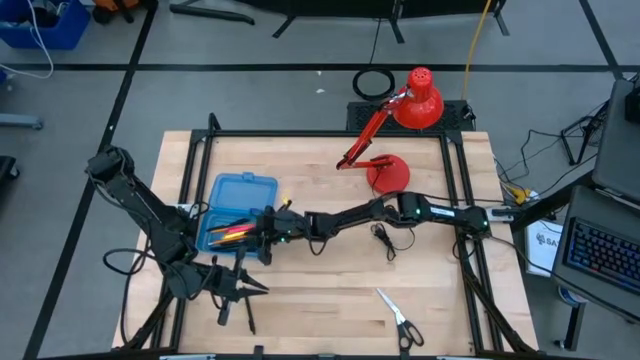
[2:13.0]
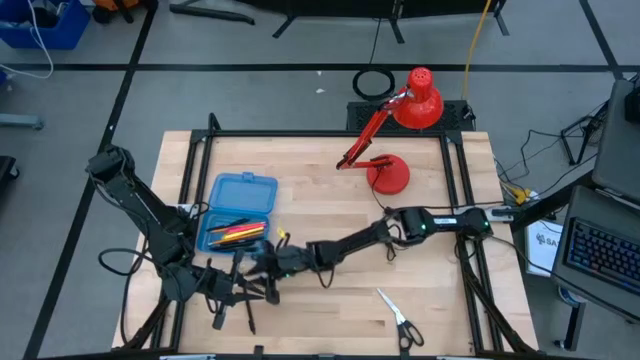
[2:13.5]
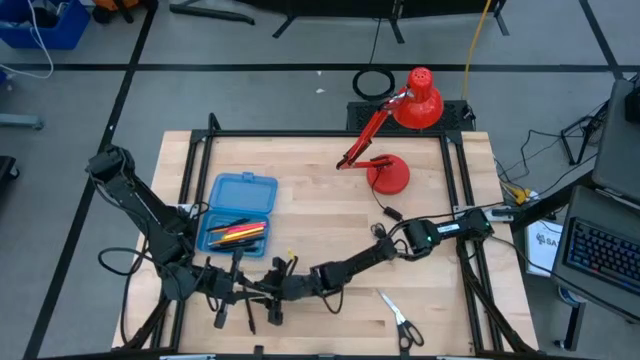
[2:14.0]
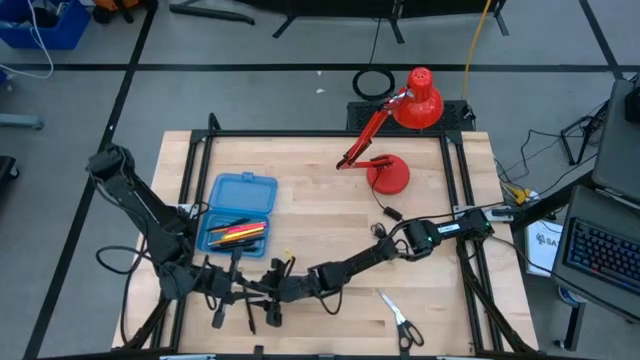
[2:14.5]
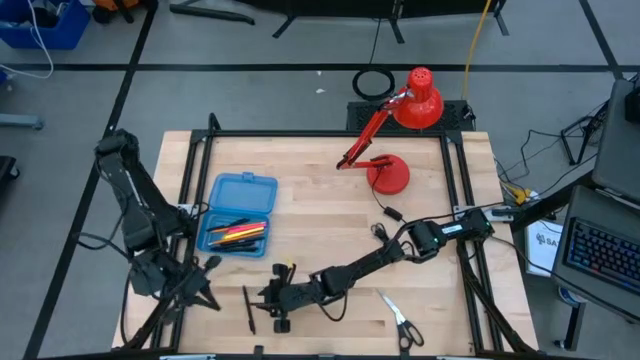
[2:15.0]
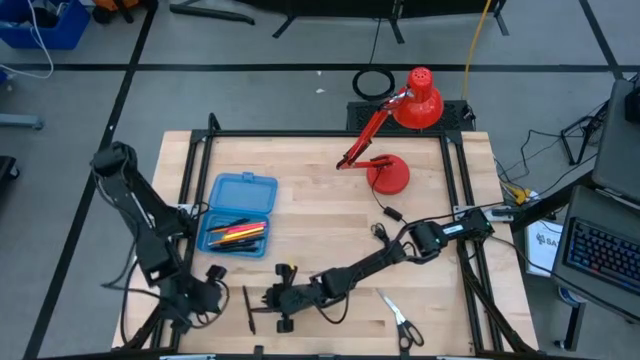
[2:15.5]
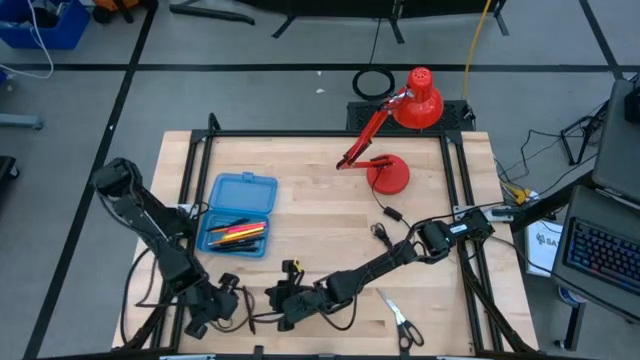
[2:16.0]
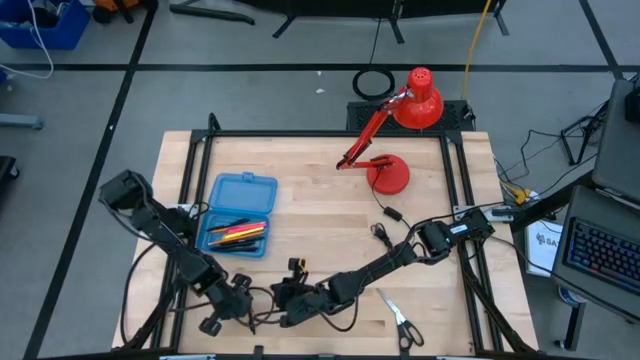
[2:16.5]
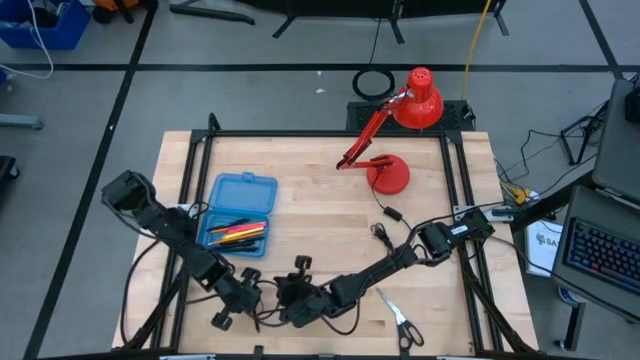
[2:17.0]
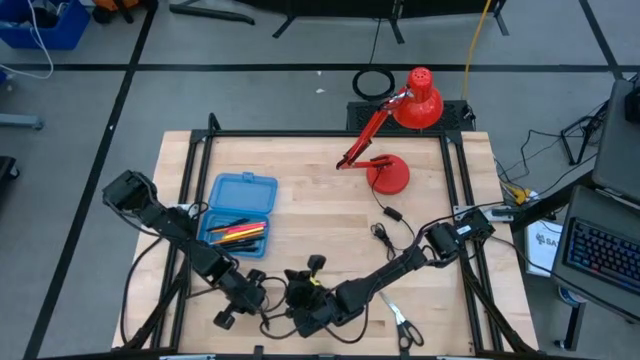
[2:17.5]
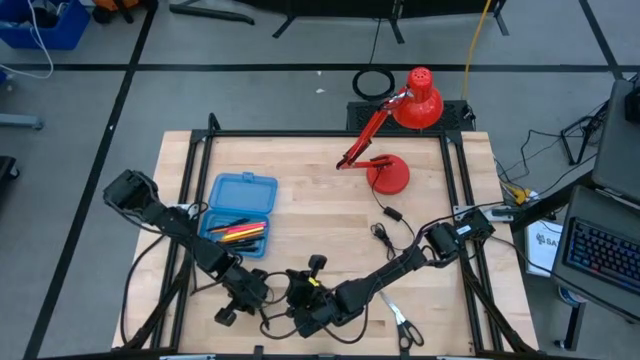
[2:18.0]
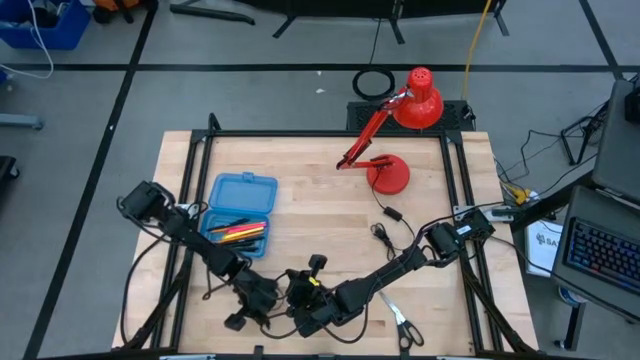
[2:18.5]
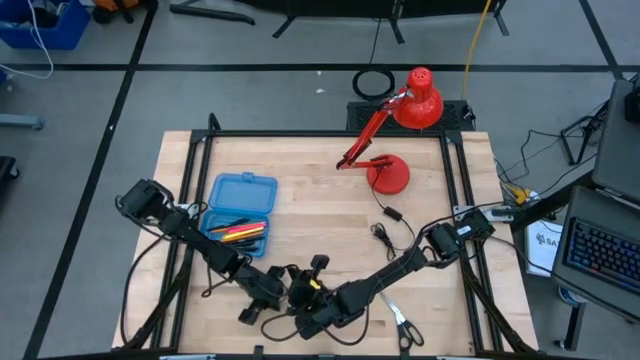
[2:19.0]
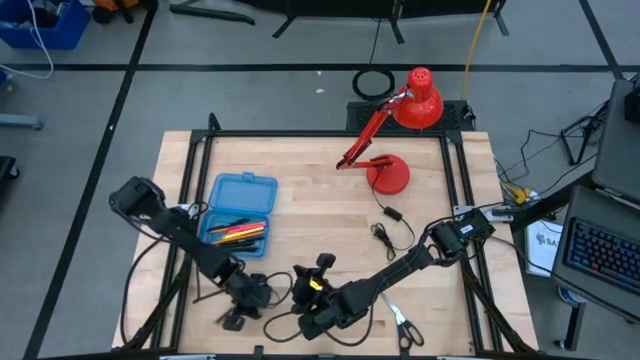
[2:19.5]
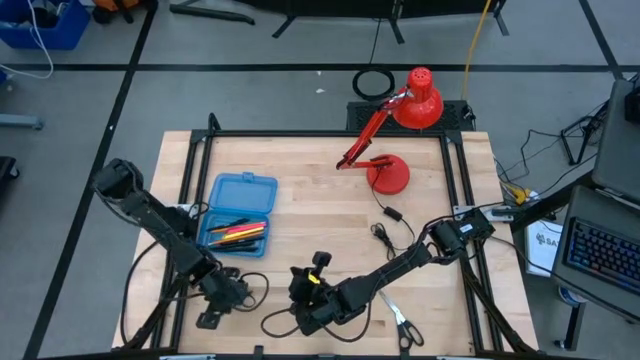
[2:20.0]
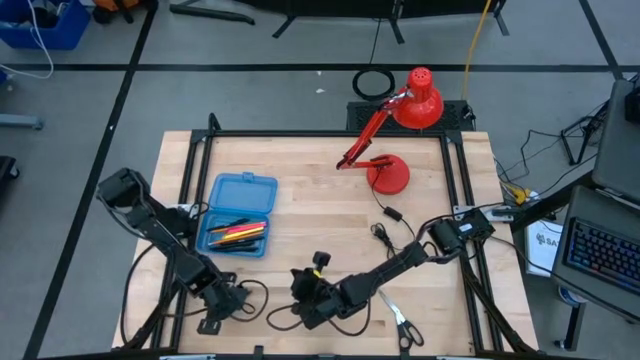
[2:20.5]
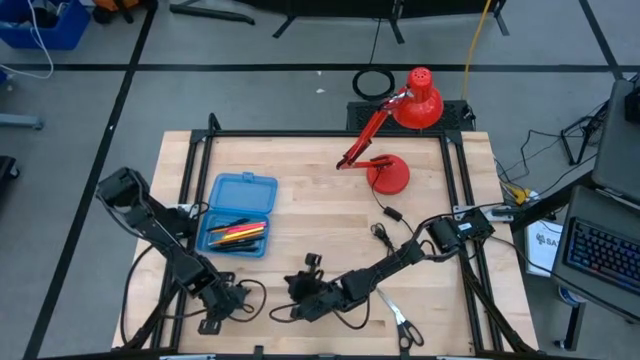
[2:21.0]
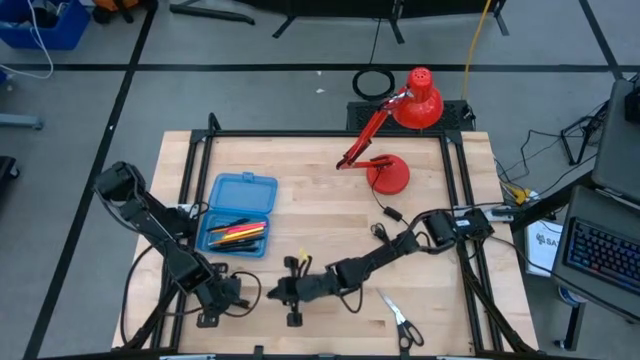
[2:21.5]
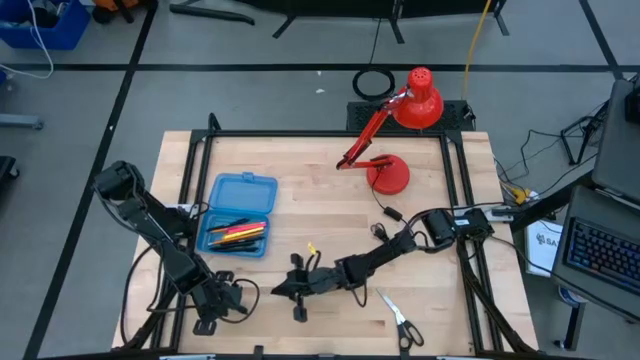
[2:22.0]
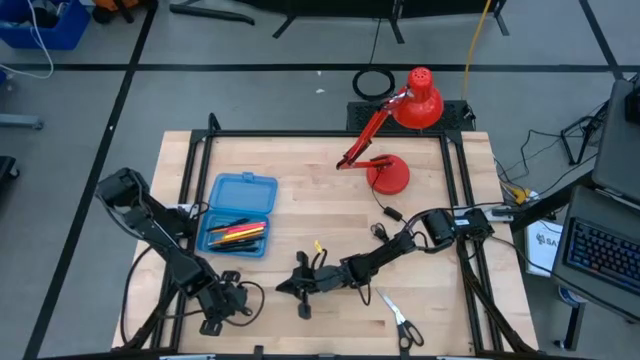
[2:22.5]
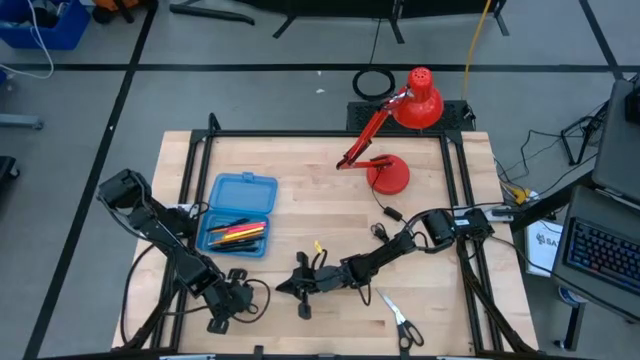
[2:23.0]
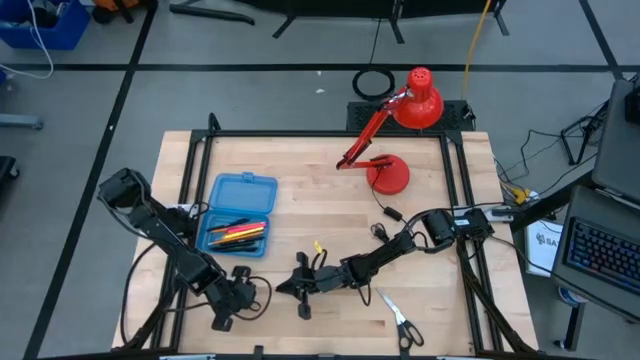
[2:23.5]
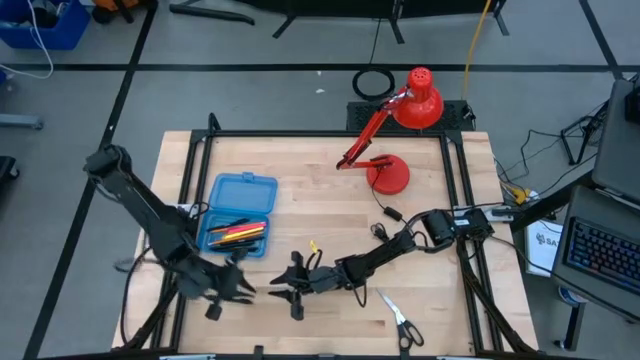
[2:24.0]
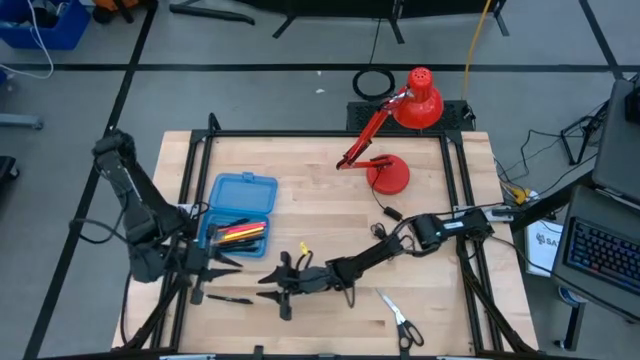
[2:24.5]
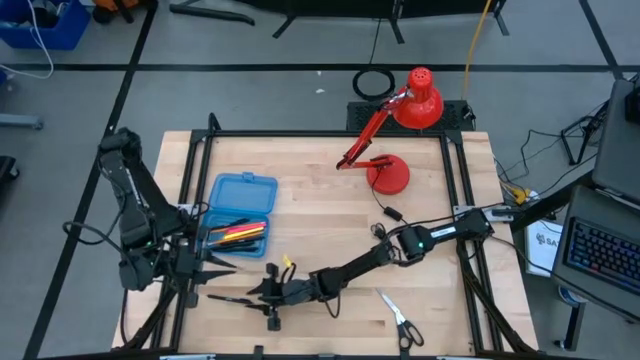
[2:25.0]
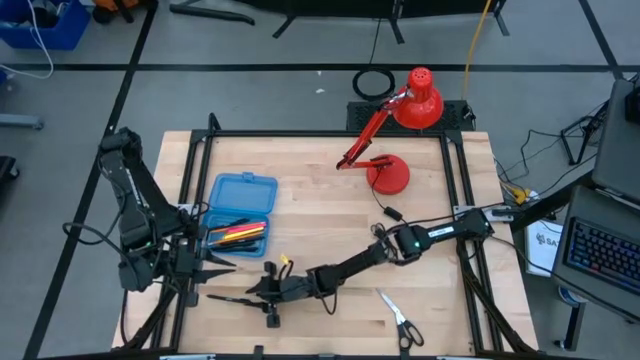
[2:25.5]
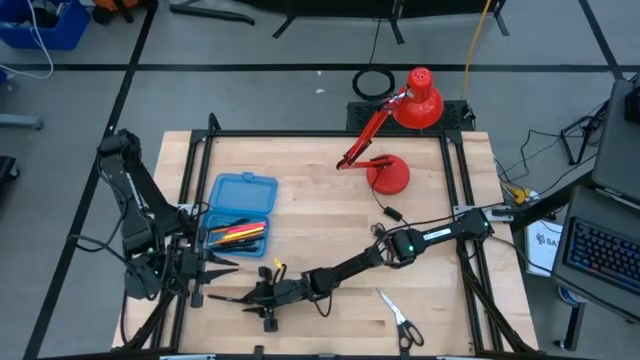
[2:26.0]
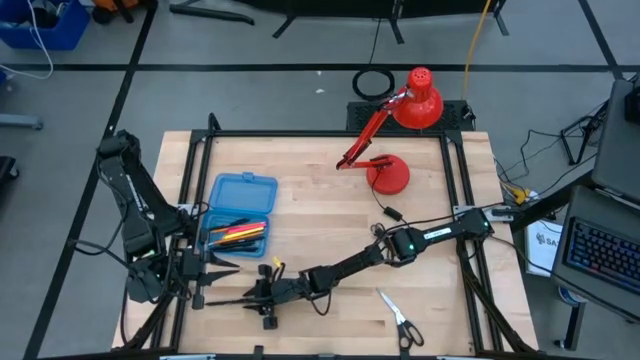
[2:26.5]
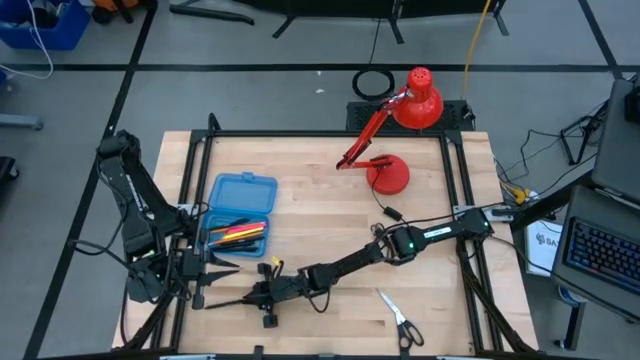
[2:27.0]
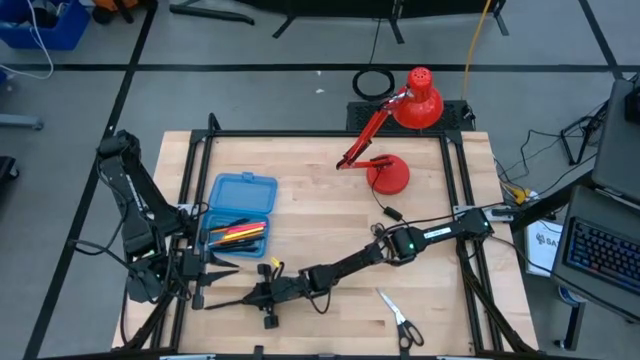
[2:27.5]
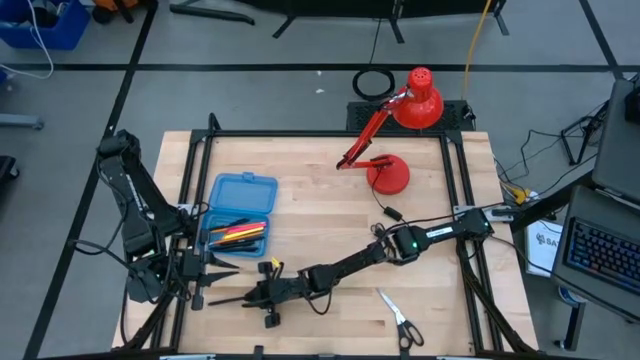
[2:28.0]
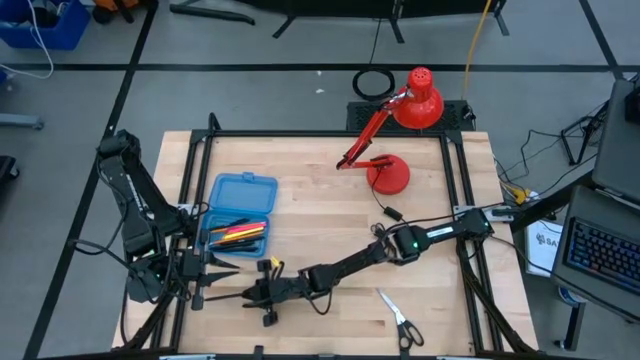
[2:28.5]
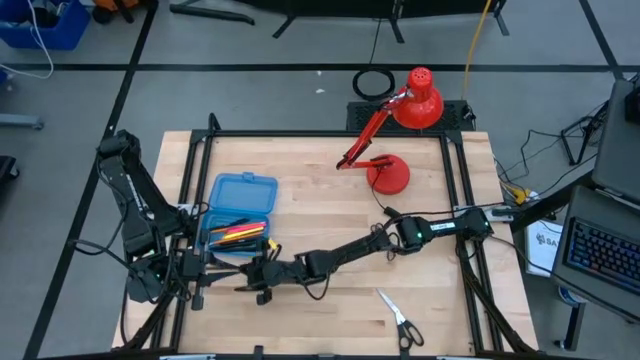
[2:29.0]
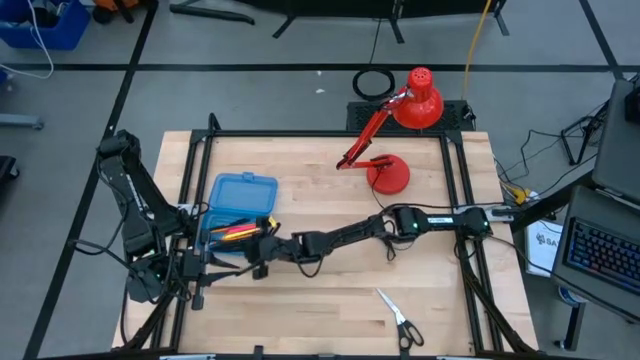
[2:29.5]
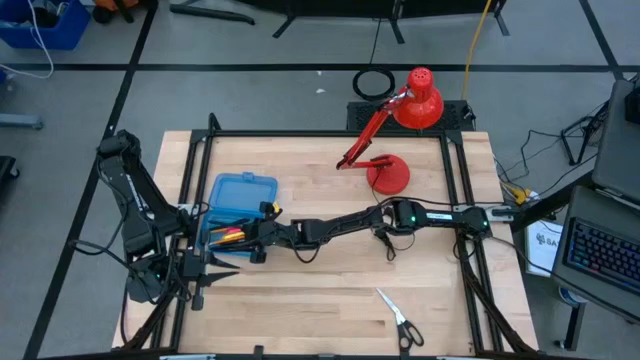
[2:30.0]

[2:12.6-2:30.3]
Task: Pick & place school supplies into a supply box
Put the black pen into the blue supply box

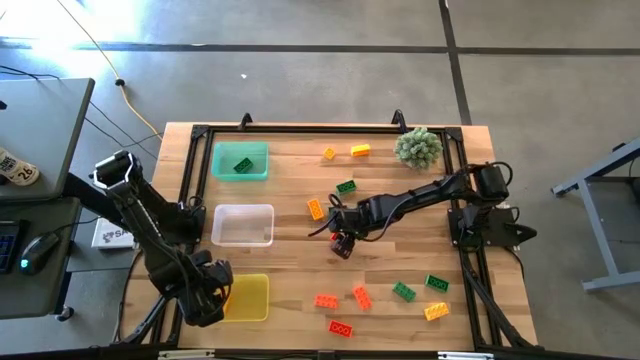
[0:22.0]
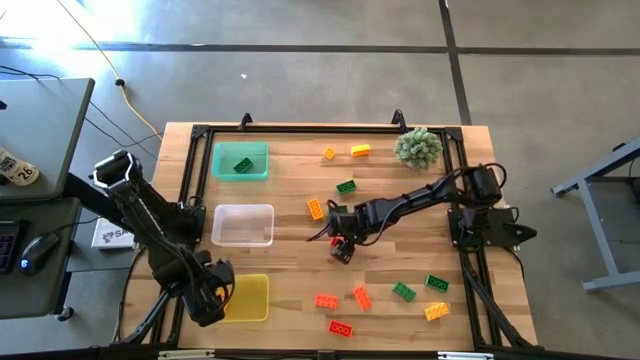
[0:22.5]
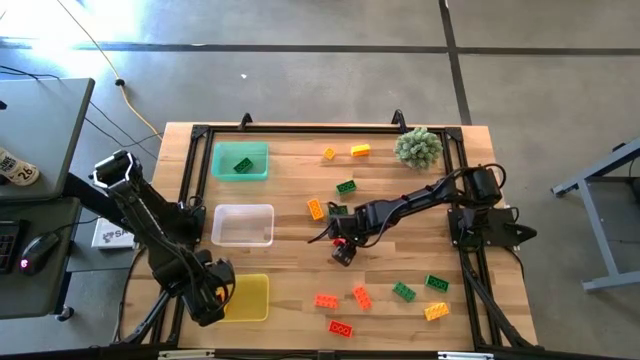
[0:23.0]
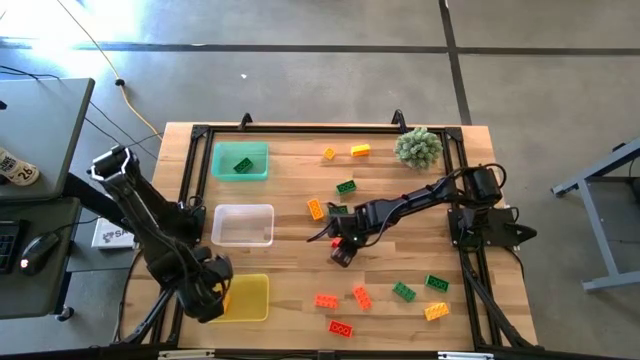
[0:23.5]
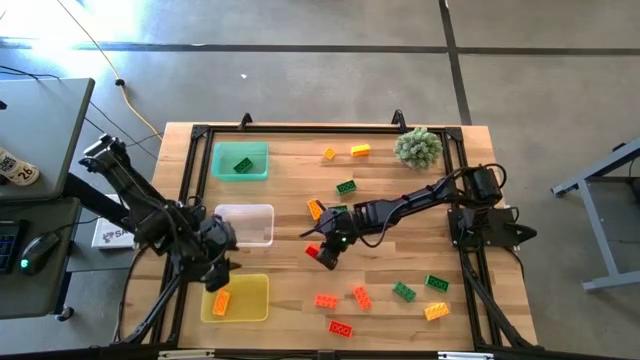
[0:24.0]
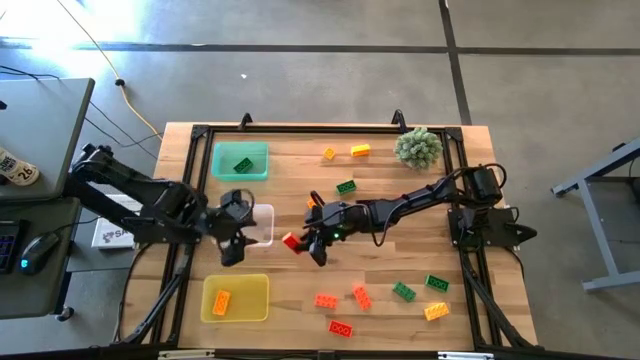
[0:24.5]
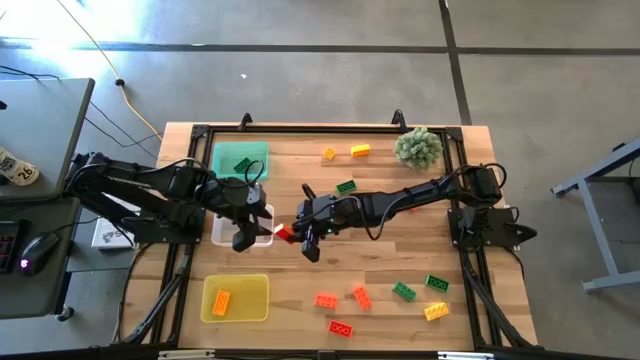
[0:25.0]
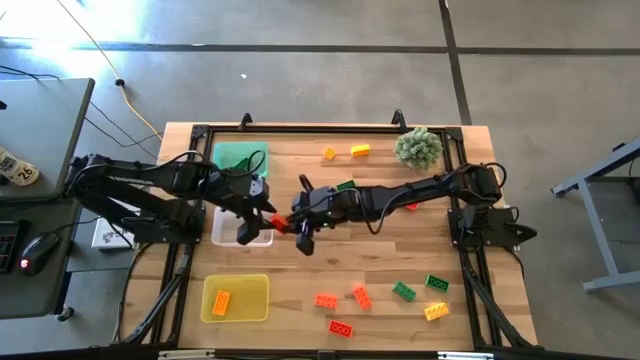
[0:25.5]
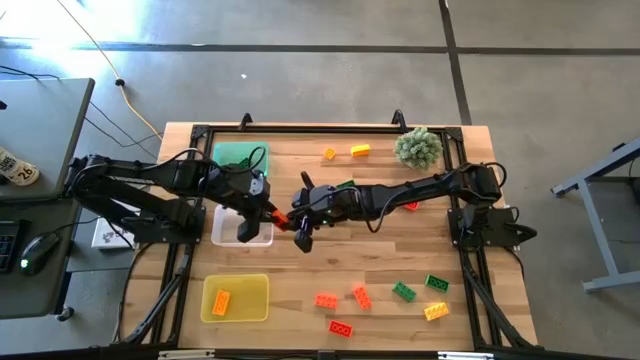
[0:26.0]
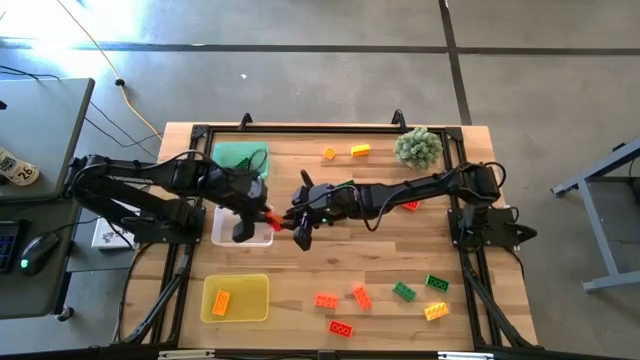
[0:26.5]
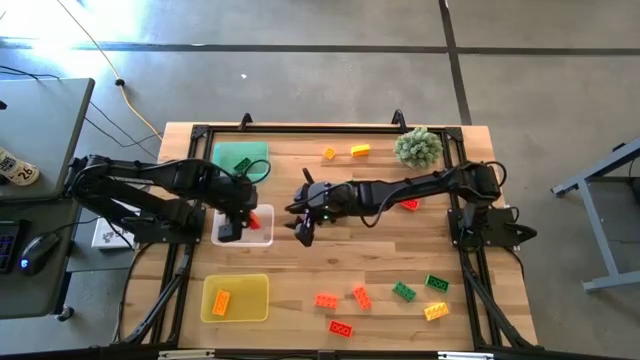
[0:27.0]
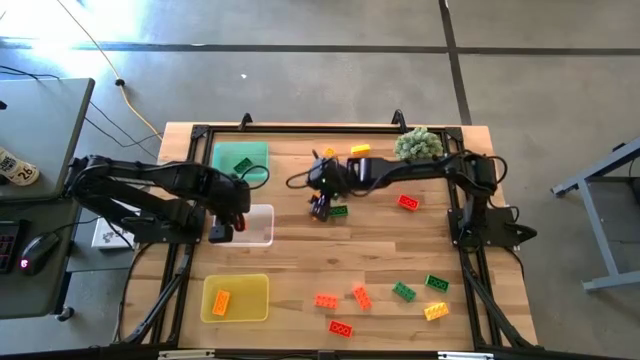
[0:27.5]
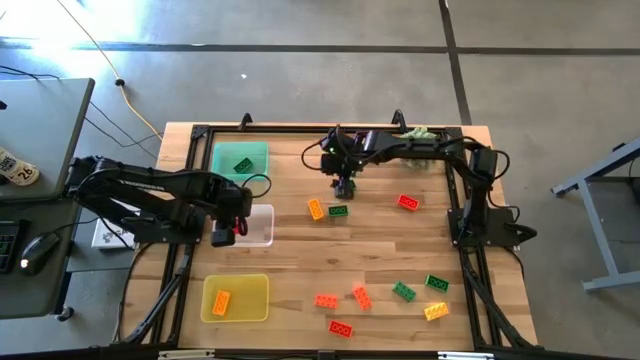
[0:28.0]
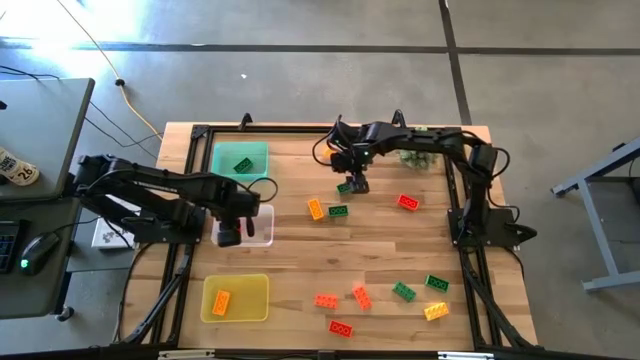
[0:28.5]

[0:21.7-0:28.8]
Task: Sort & place blocks by color
Put the orange game piece into the white bin
